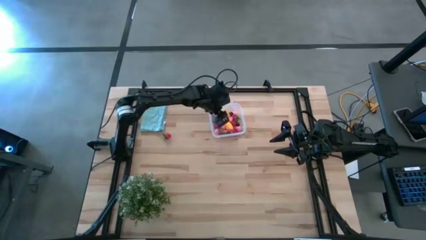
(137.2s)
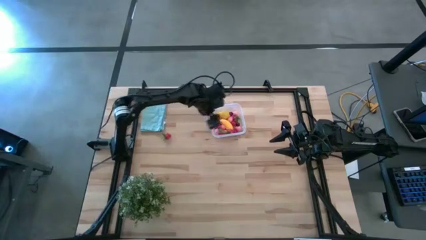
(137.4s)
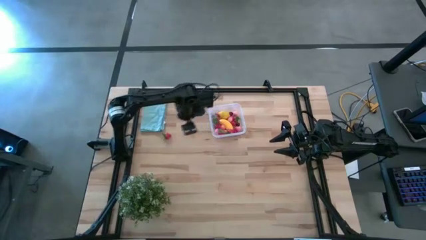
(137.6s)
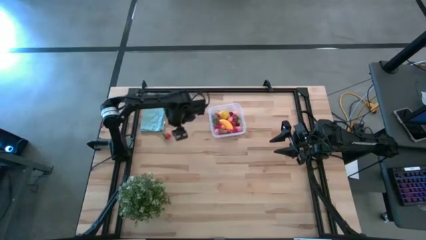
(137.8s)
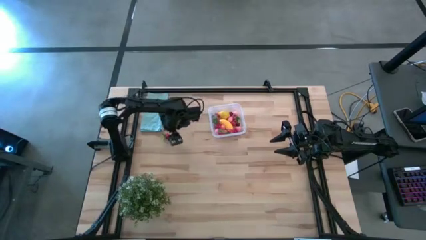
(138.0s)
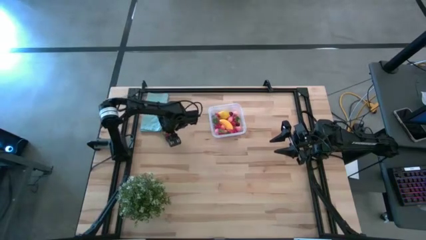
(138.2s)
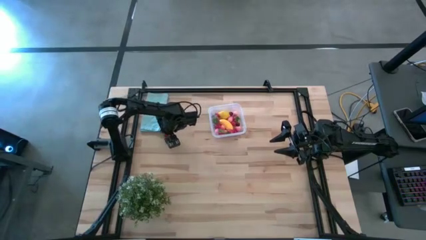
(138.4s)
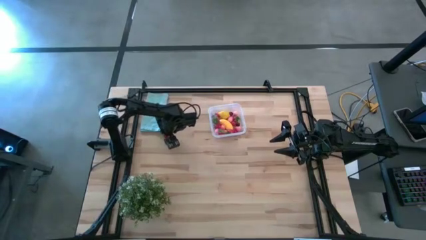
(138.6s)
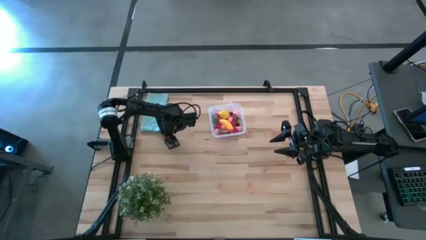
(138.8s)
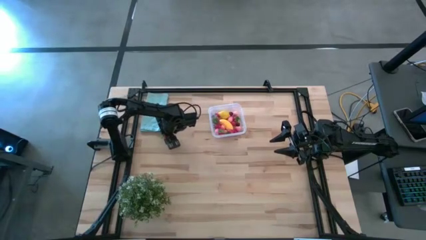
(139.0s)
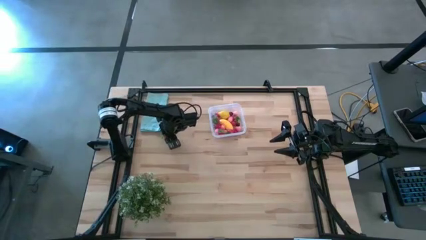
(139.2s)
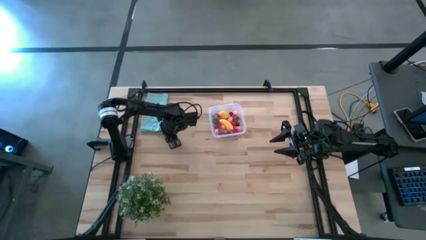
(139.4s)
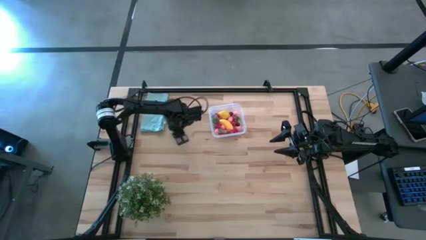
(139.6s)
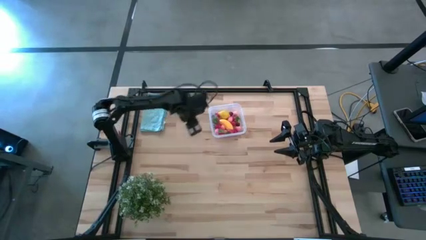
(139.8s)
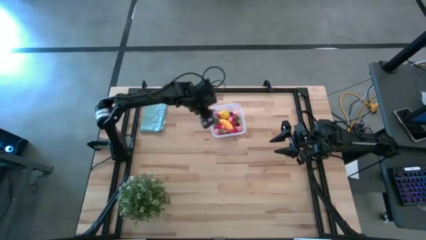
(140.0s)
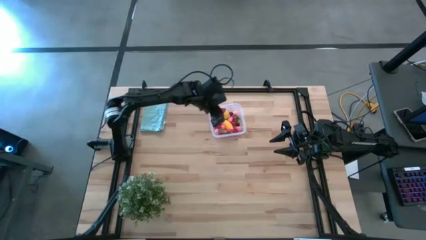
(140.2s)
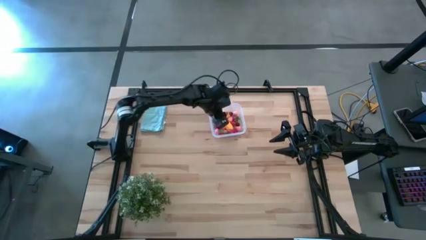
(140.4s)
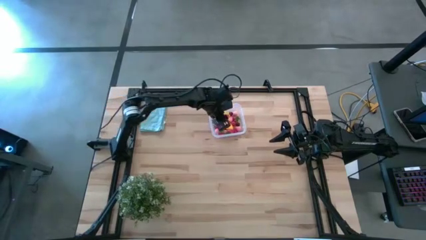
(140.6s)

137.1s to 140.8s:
Task: Pick and placing Produce into tupperware
Put the red strawberry into the transparent bin

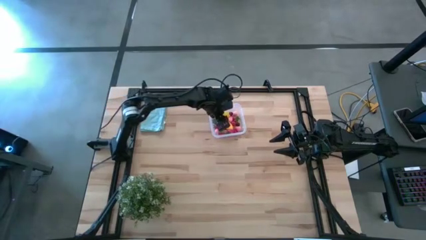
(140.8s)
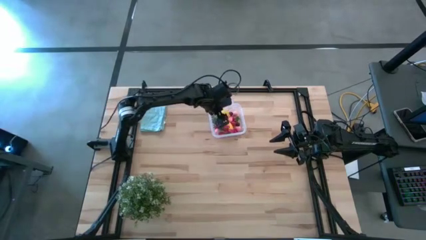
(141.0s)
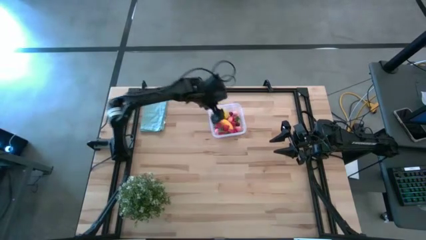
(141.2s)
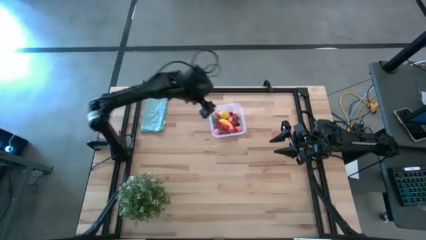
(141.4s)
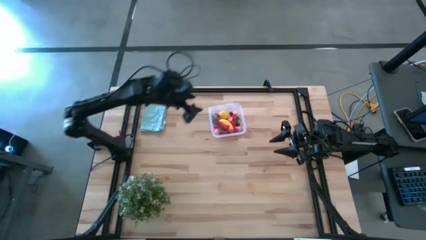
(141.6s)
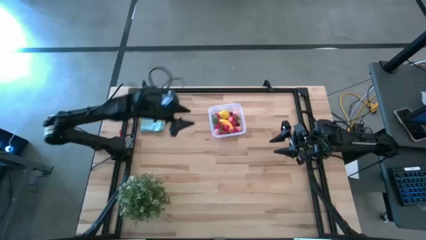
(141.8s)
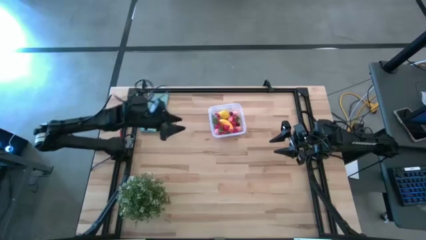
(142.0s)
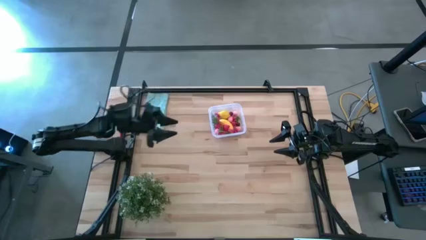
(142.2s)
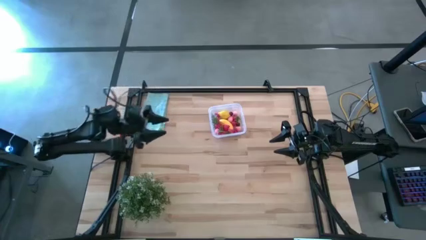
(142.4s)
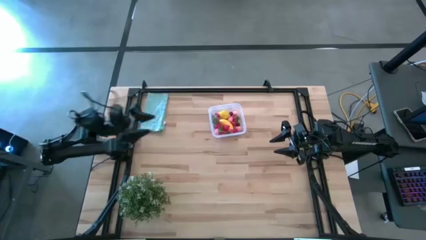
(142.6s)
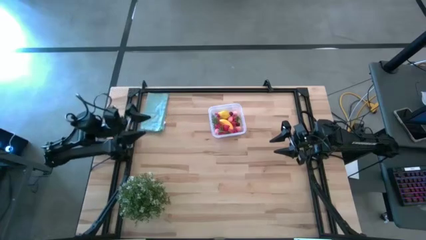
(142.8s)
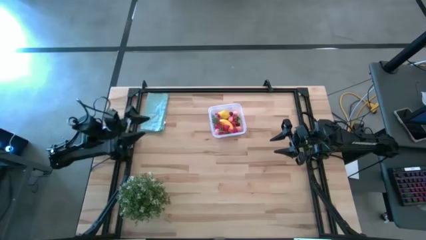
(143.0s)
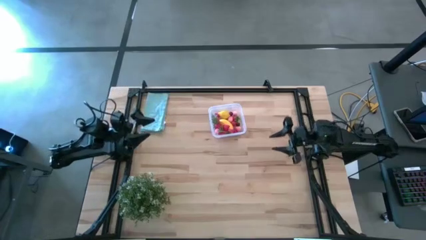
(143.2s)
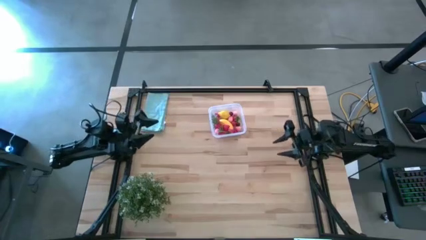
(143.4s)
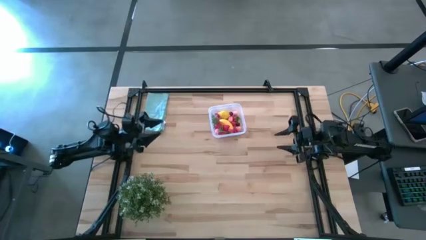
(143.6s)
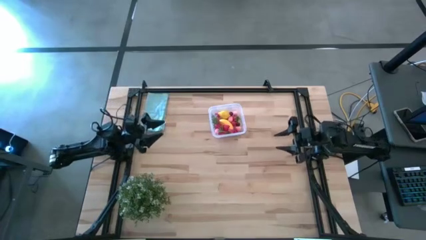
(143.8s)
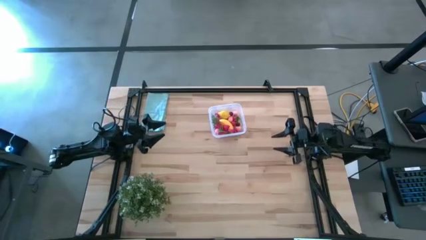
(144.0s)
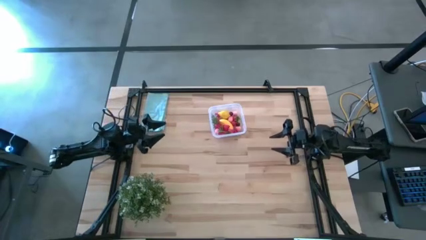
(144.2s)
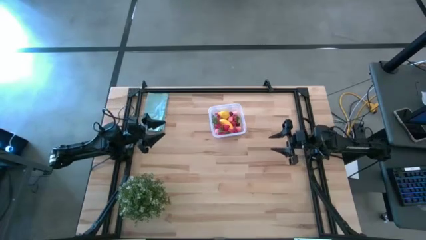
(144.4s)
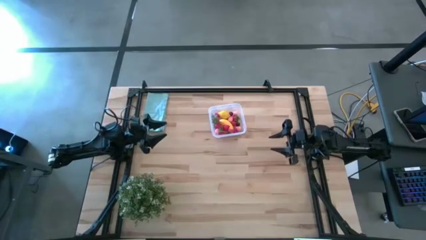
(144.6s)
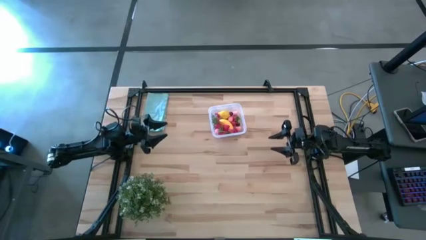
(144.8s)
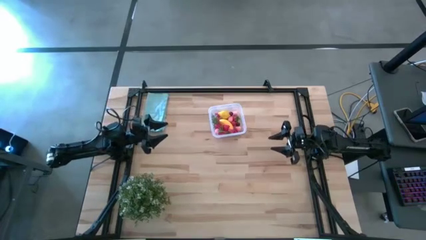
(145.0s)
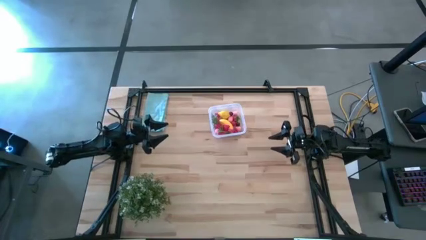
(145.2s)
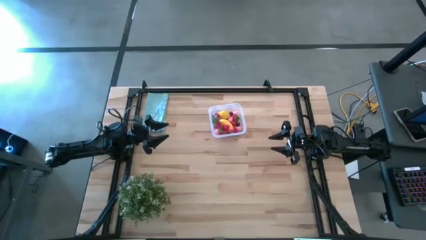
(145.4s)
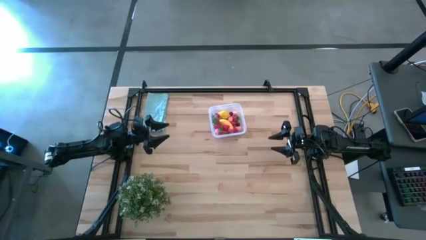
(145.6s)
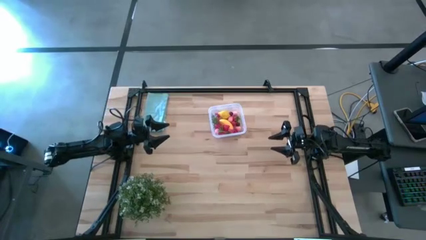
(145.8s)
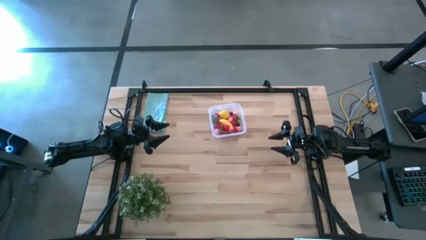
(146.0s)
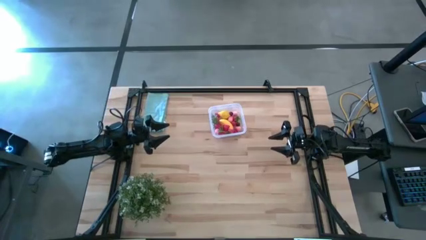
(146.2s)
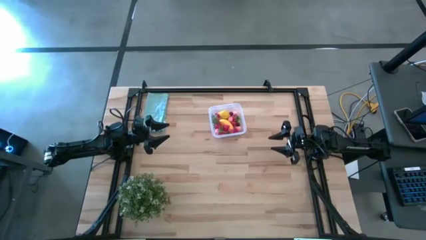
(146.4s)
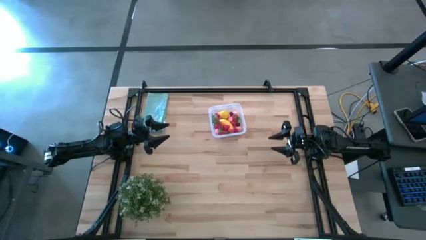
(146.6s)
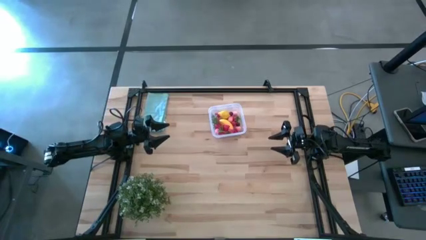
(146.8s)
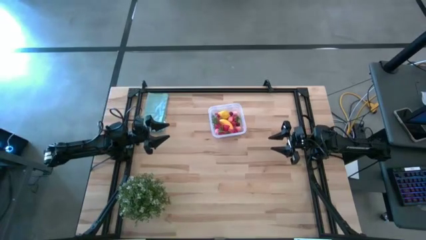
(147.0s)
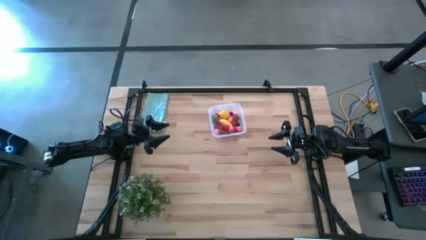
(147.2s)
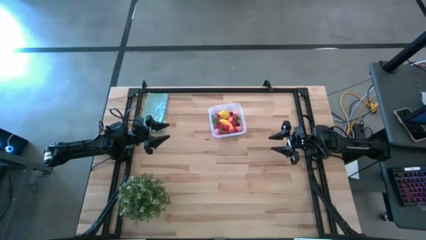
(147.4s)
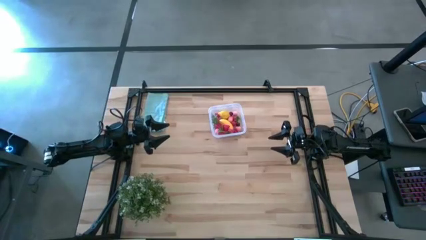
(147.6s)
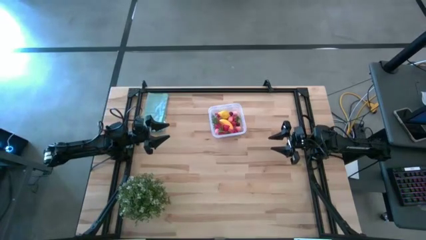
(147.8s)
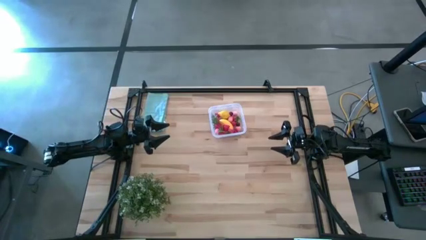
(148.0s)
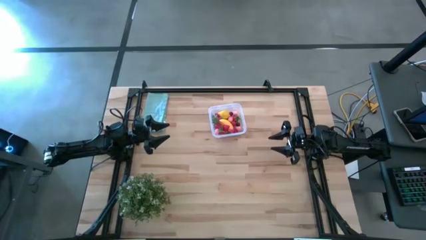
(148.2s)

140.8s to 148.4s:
Return to Home Position

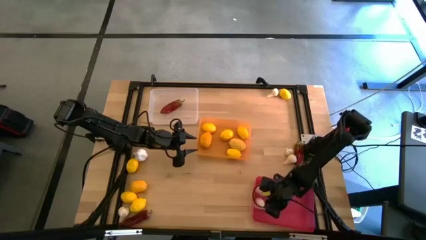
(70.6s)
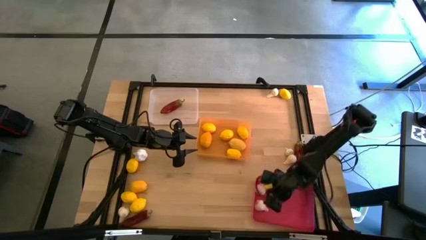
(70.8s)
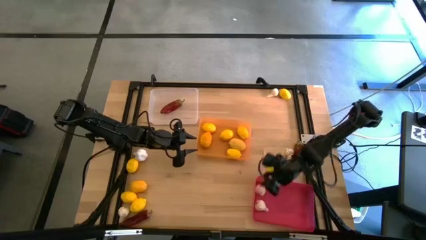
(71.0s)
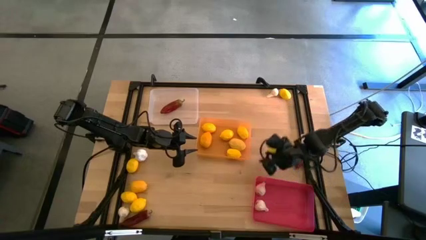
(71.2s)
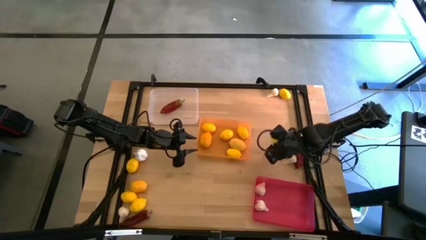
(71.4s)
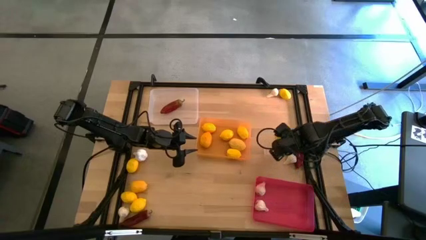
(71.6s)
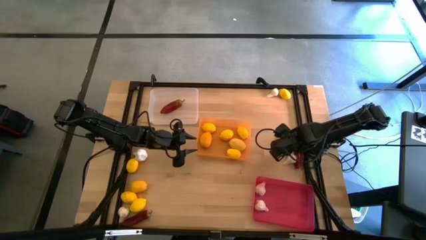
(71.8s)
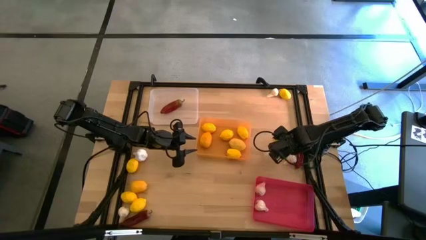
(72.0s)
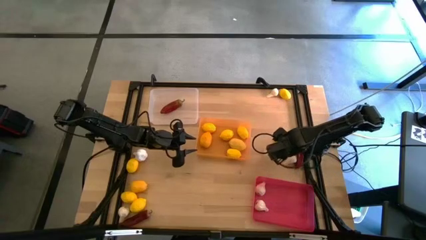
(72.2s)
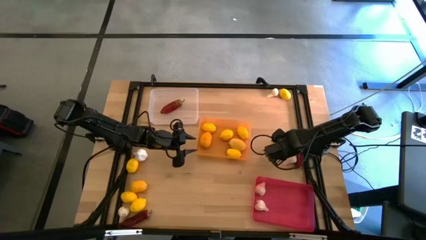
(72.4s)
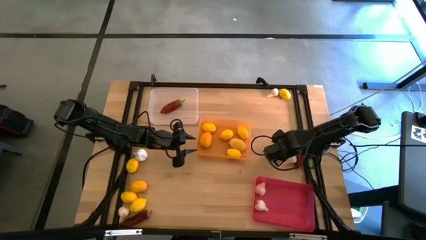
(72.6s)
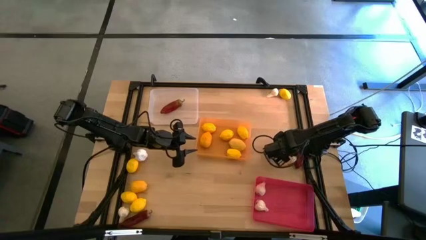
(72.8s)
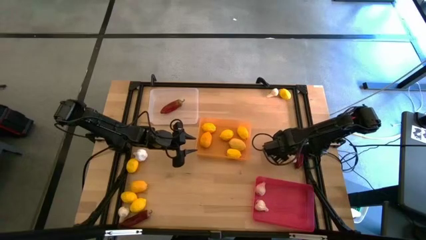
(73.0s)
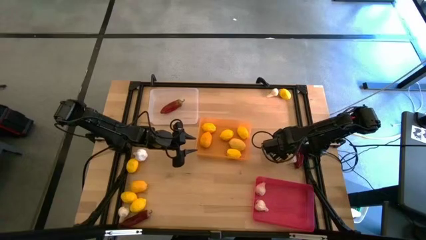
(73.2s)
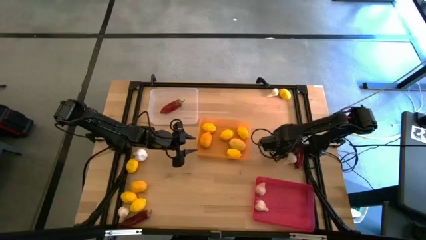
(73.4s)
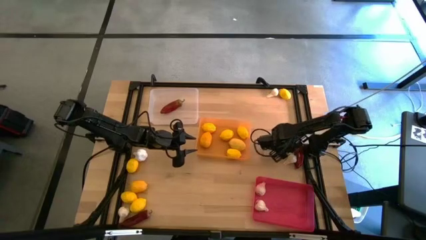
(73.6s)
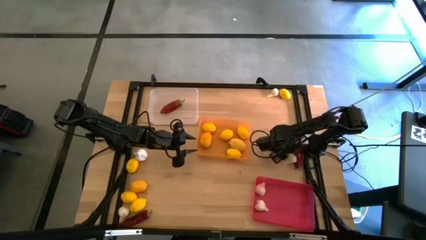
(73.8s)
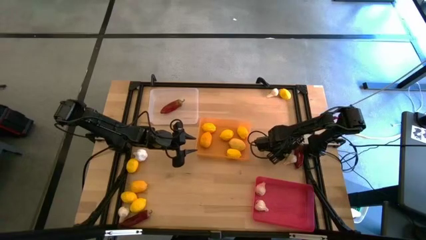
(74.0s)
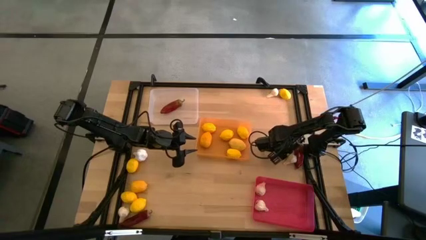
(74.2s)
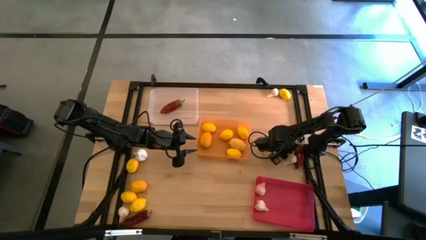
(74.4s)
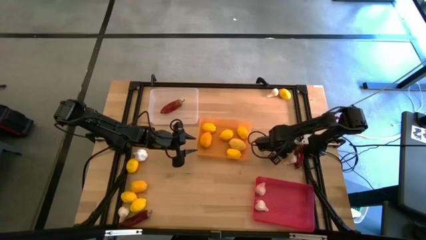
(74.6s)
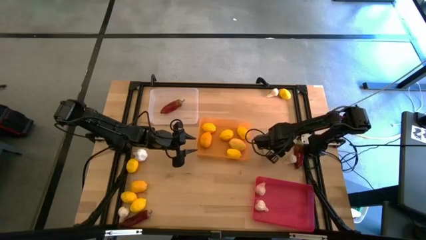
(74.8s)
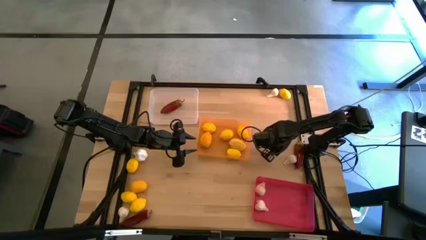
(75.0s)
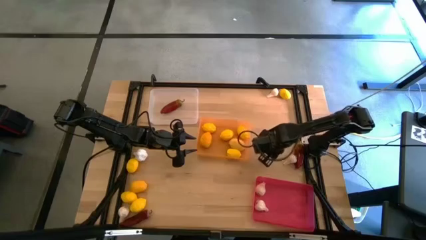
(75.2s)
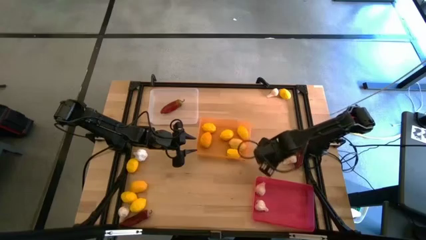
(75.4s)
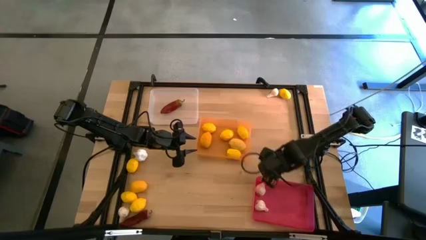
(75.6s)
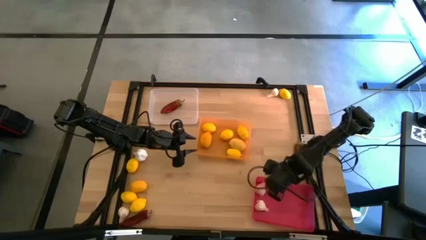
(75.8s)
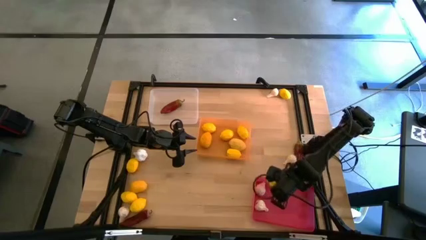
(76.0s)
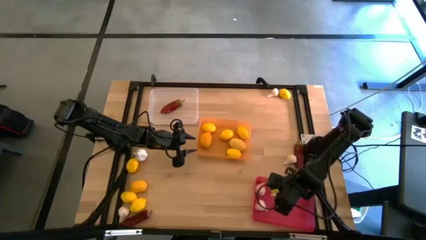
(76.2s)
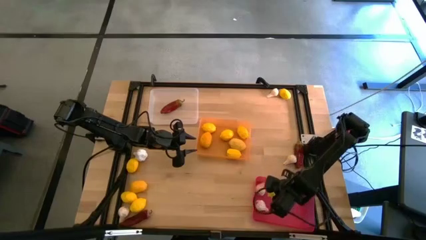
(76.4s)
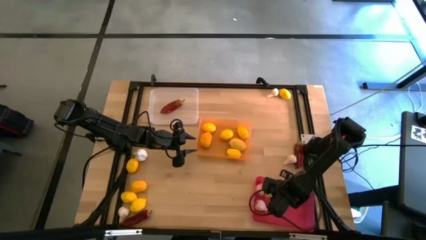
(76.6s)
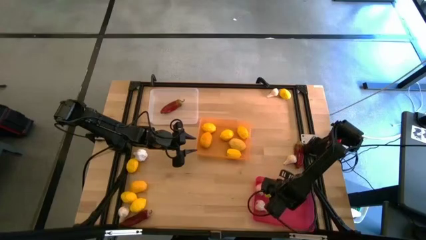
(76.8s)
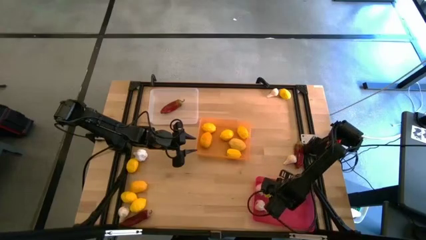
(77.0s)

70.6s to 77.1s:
Task: Sort produce into baskets
Put the garlic into the red bin
